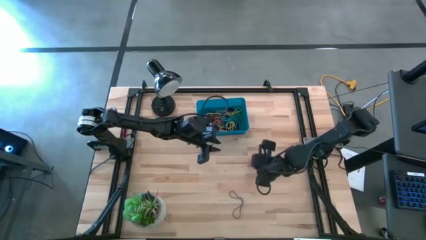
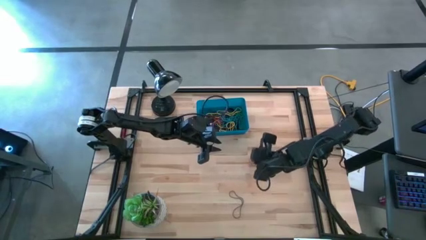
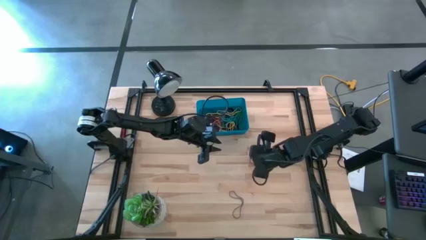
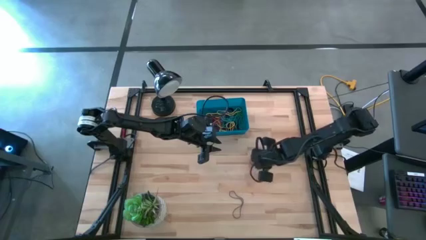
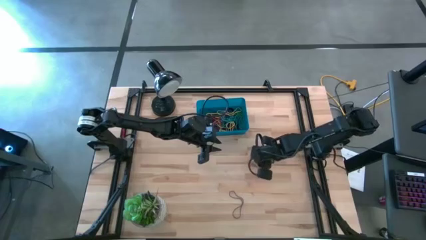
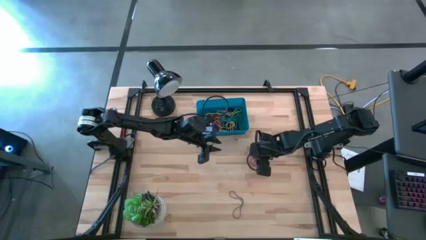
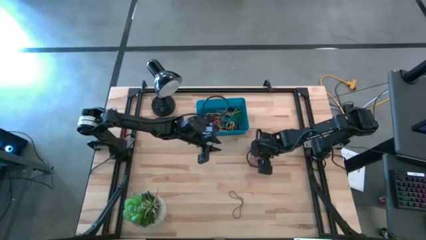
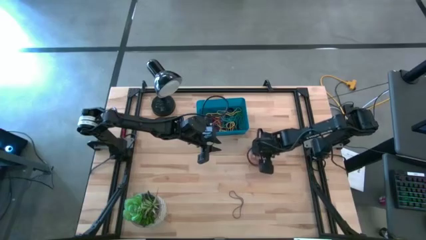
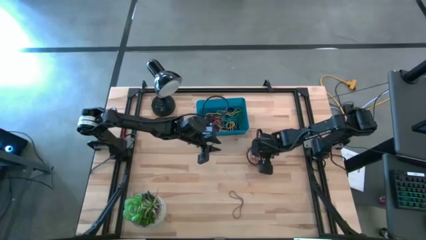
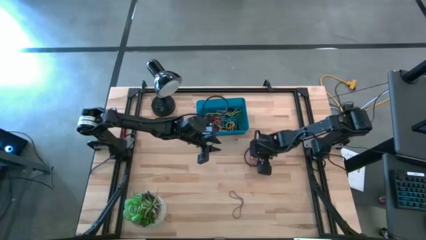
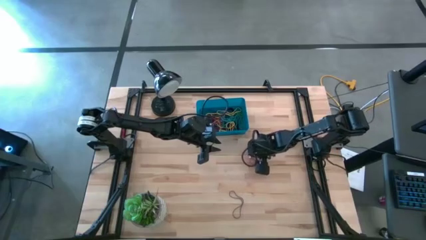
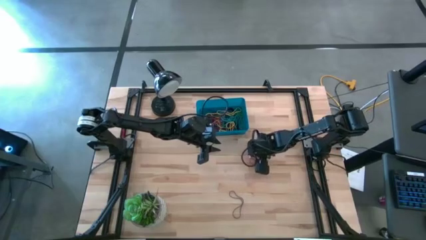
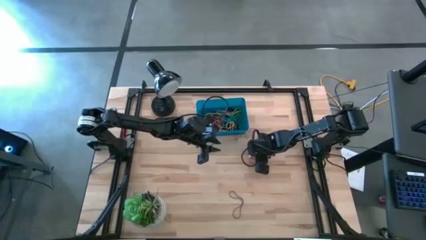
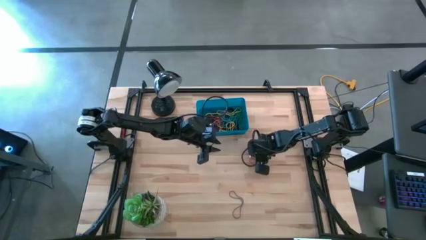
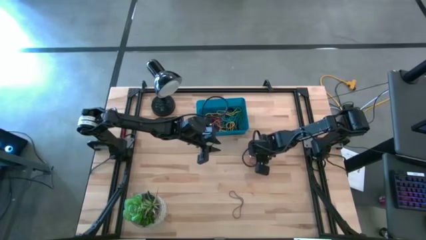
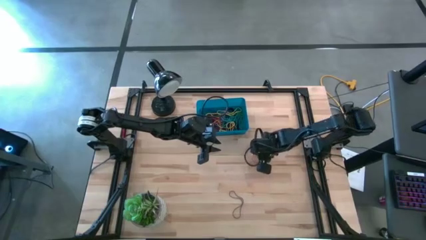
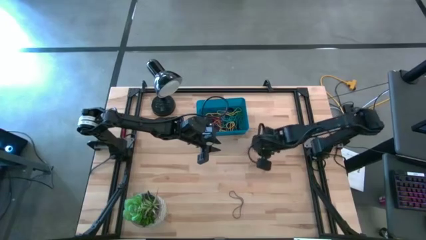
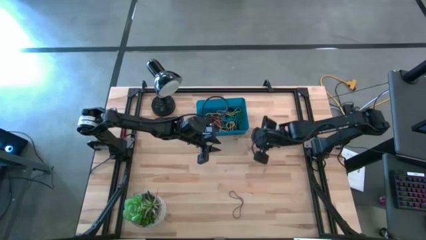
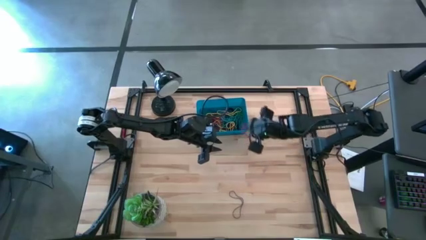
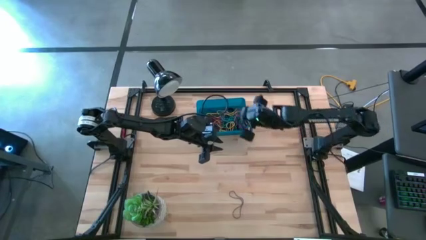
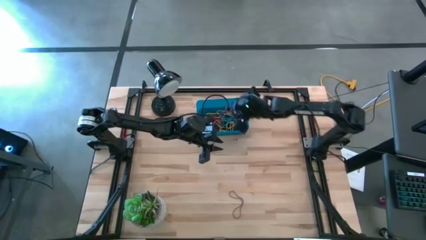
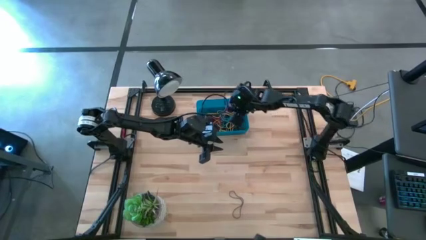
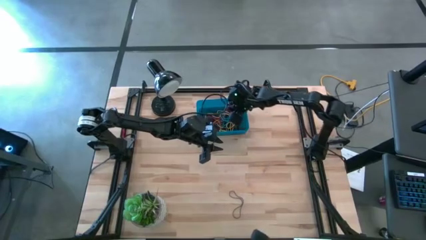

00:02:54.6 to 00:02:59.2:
Task: Pick and place rubber bands into bin
Put the red rubber band into the blue bin

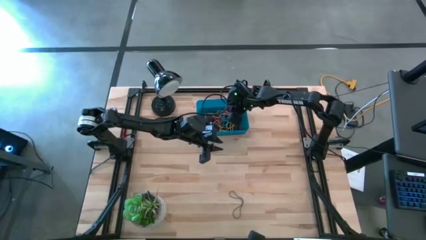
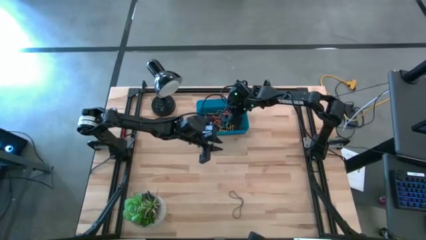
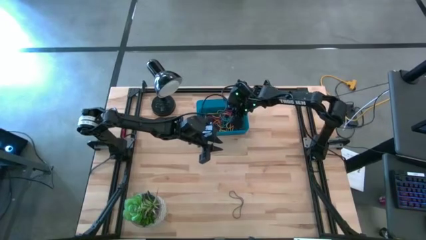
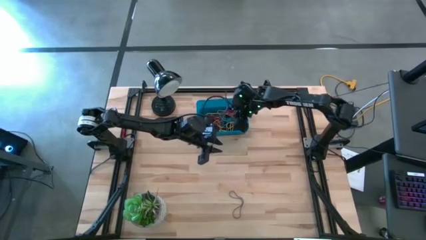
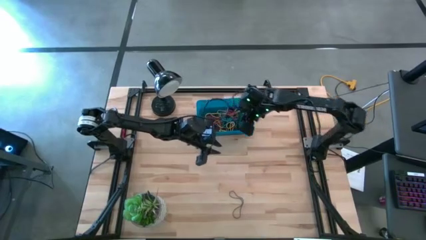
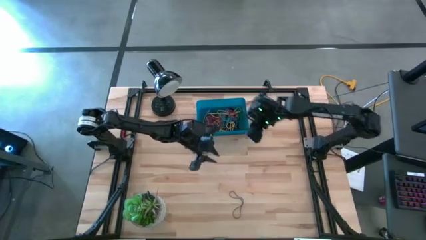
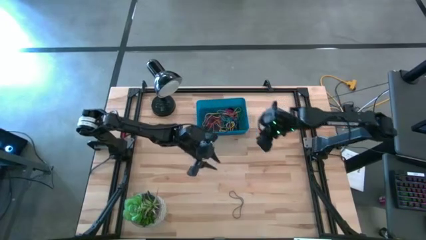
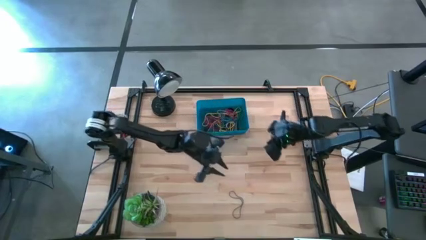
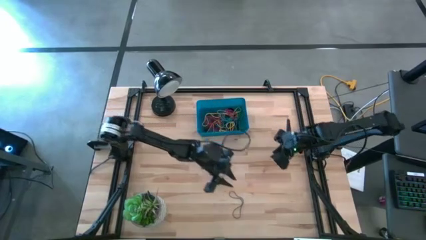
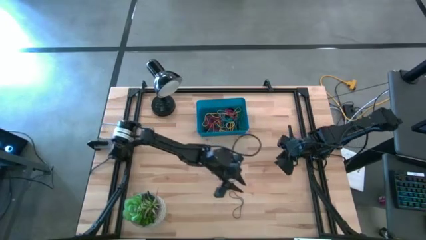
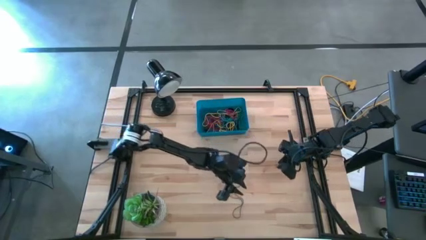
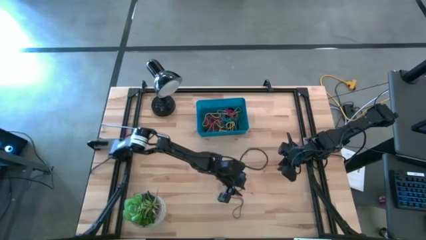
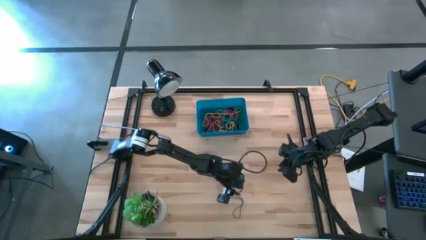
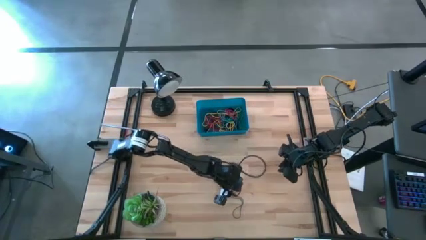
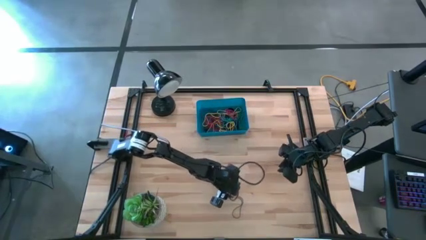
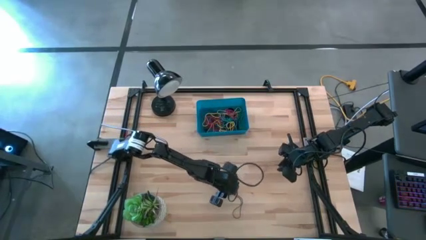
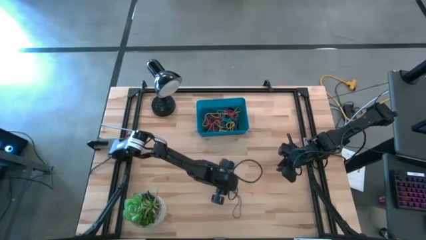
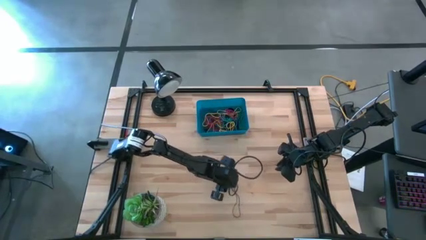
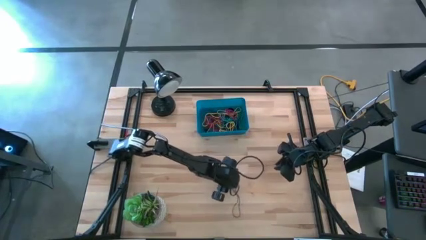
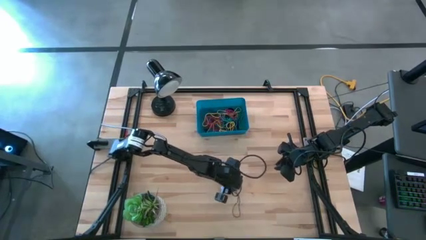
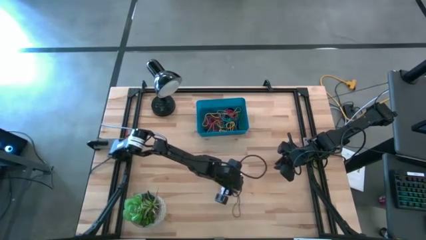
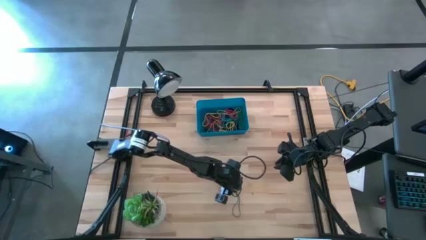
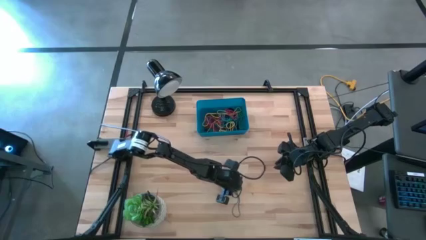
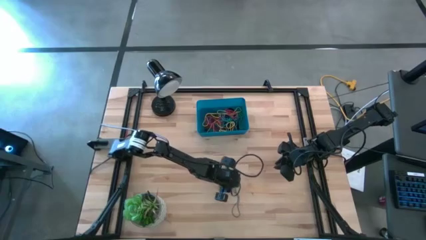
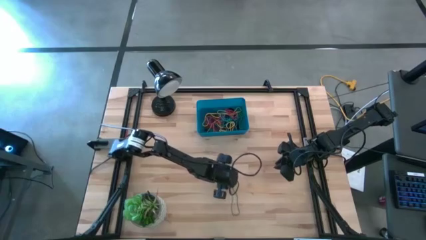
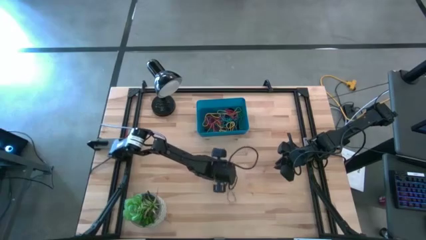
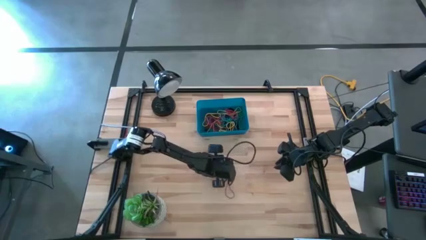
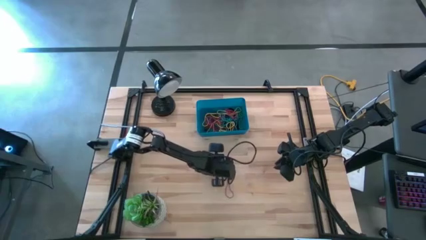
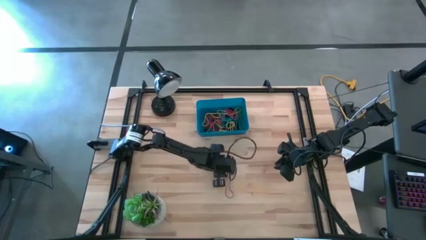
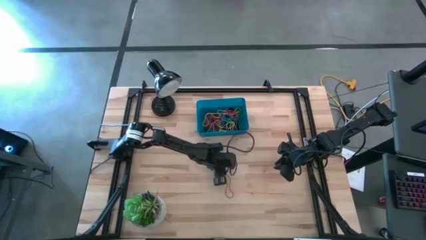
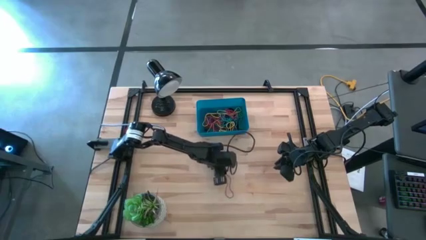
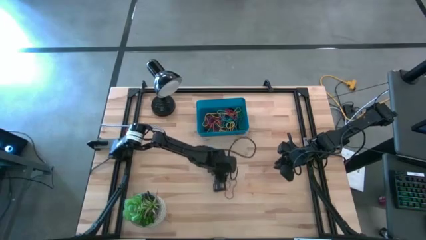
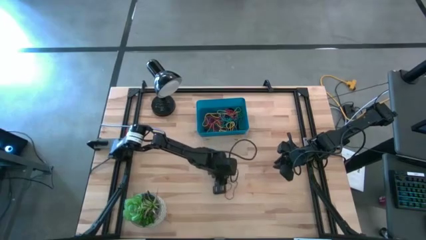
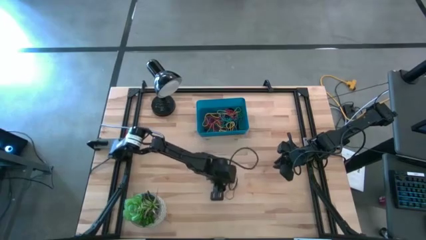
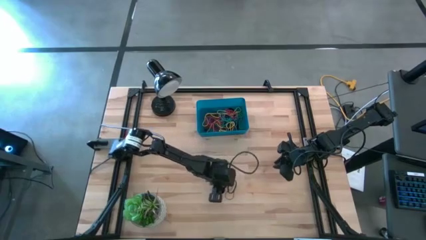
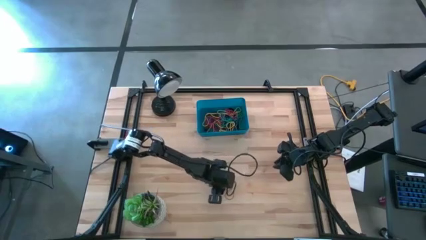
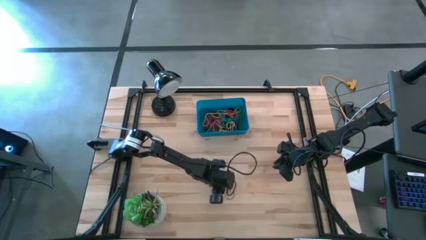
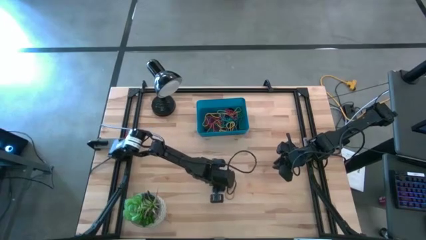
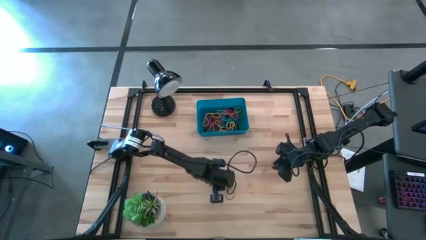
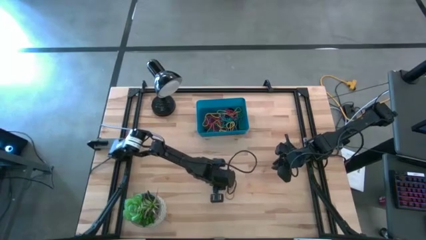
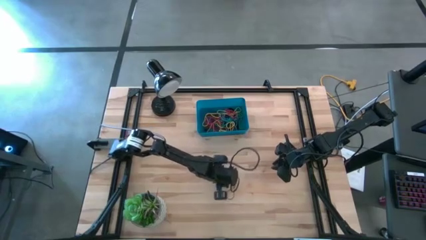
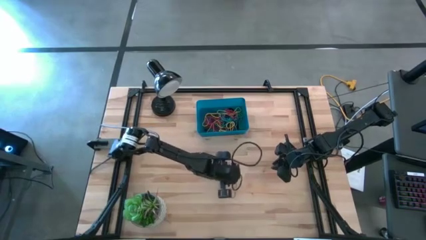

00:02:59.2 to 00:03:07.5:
Put the purple rubber band into the blue bin

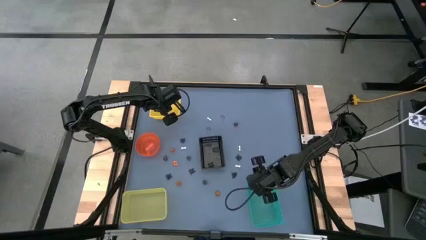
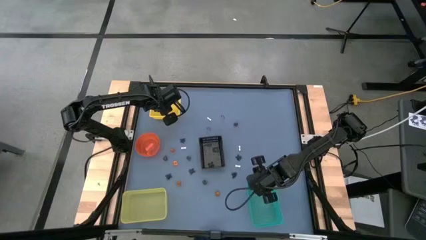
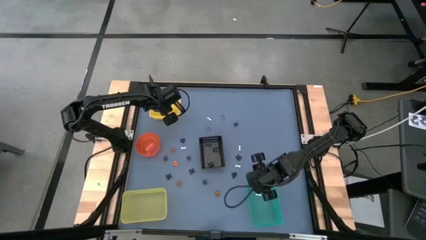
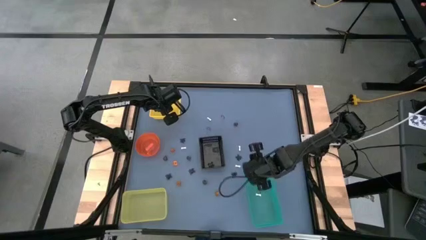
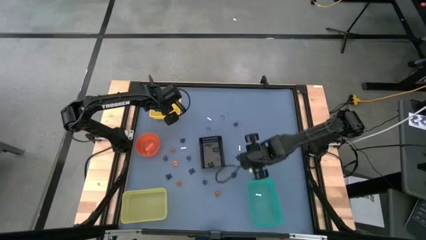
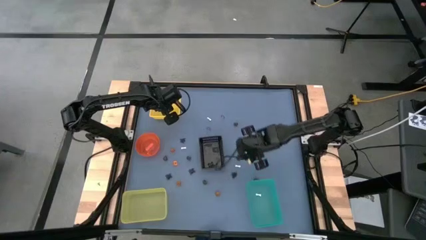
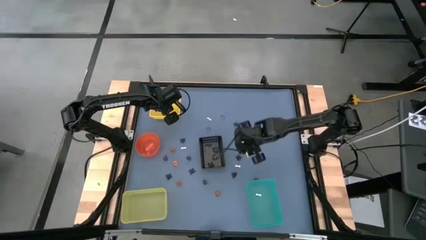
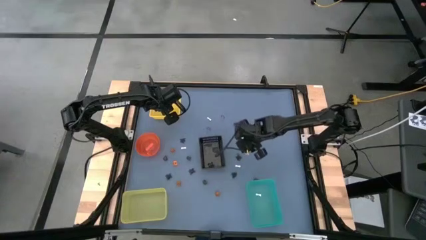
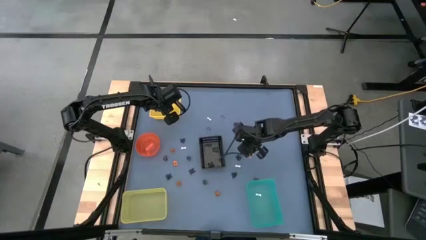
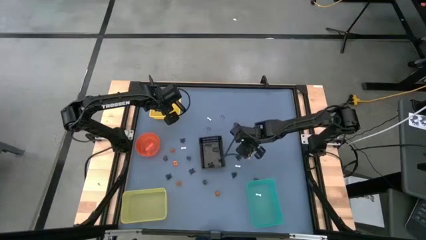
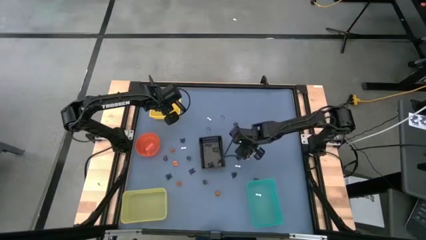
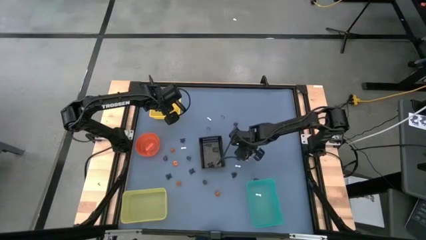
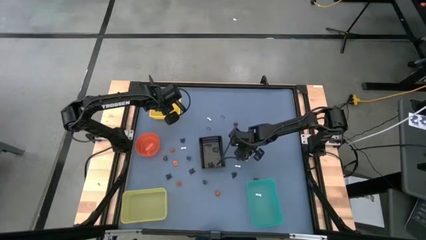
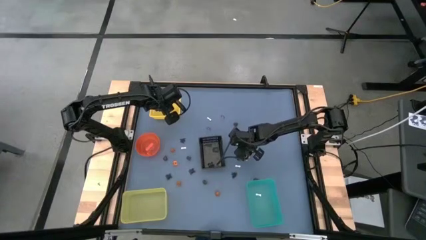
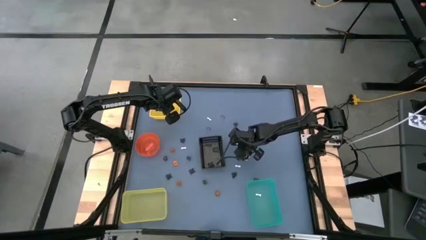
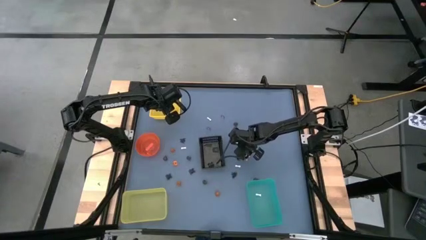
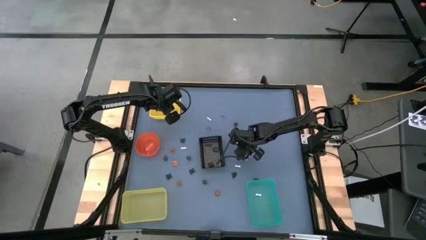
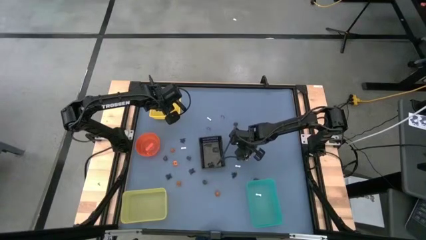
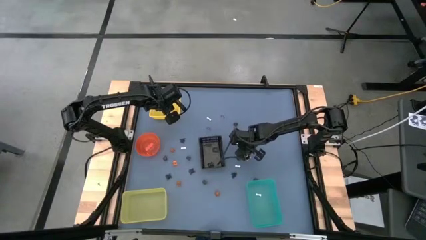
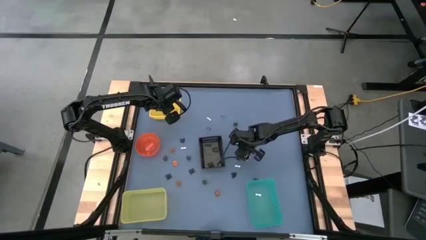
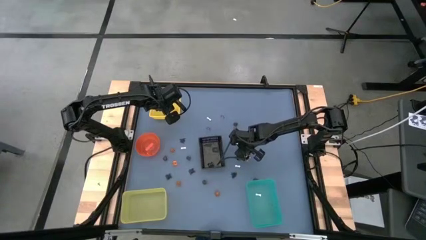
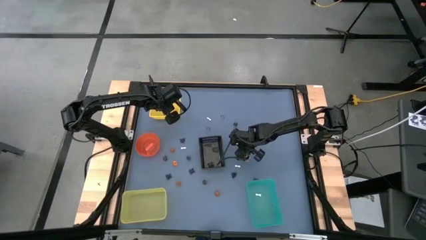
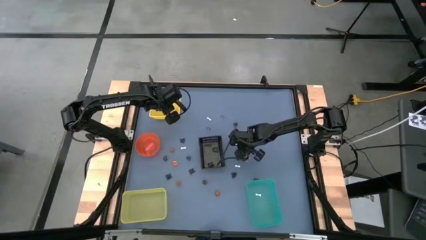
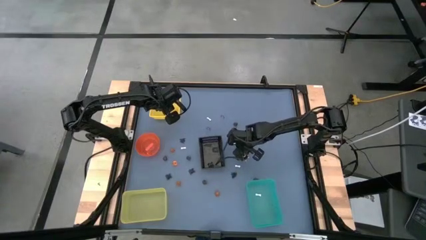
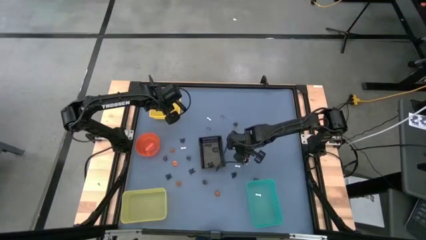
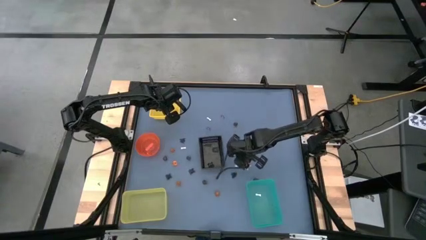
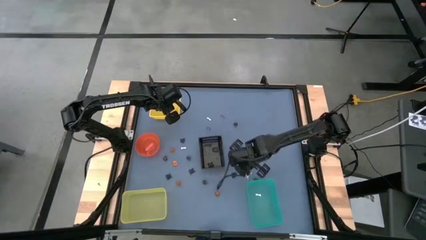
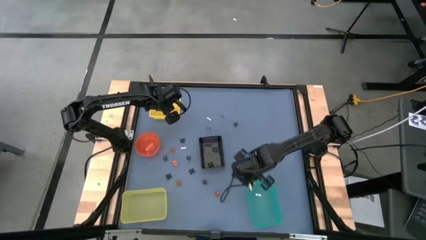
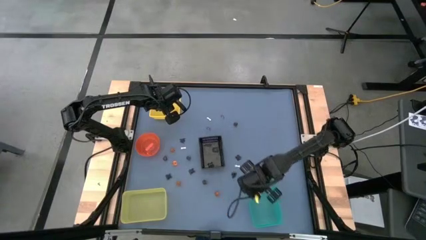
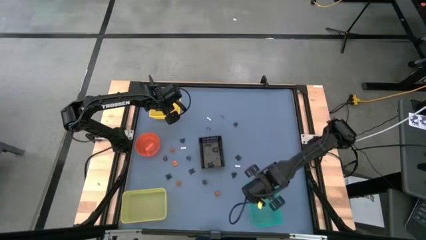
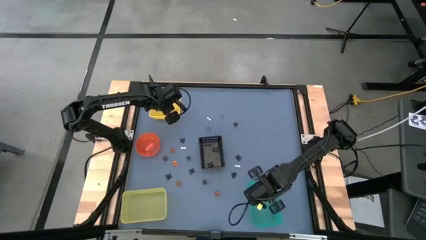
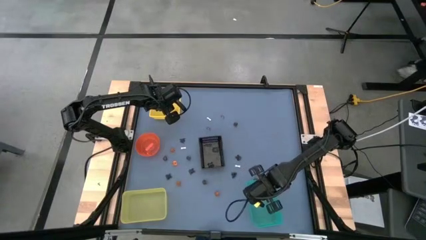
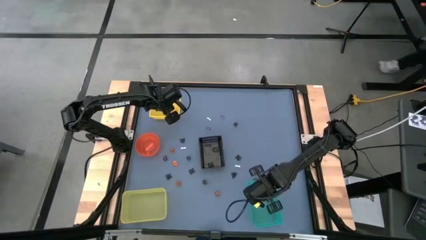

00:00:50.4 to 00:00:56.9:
Task: Sort Halloween decoration
Put the white bone toy into the green bin
